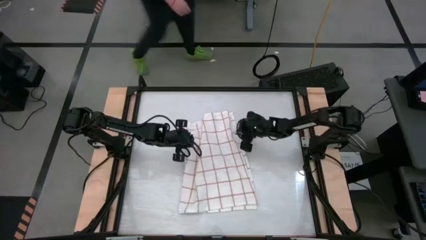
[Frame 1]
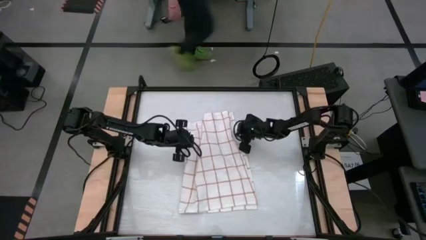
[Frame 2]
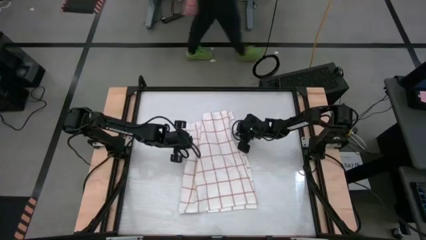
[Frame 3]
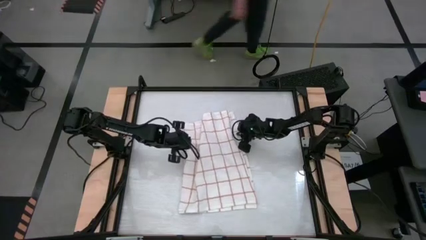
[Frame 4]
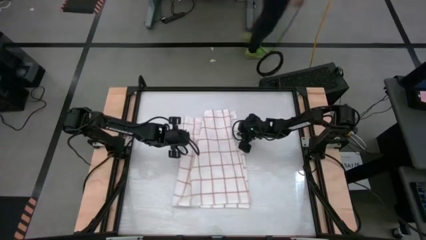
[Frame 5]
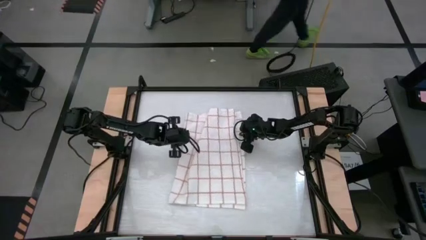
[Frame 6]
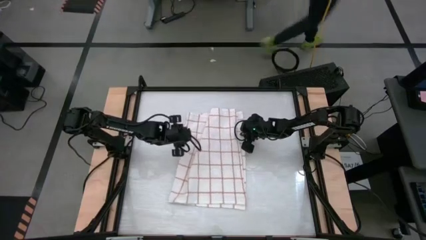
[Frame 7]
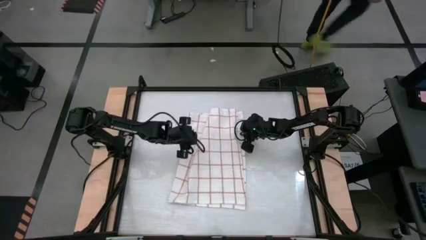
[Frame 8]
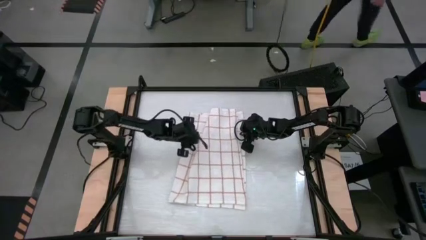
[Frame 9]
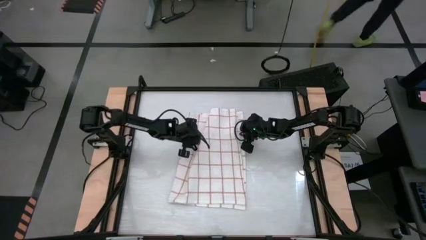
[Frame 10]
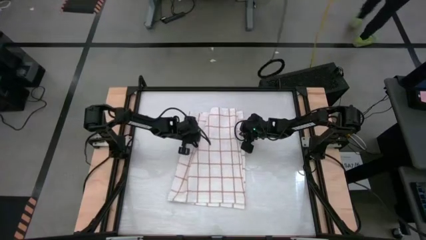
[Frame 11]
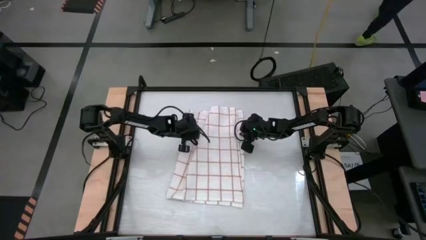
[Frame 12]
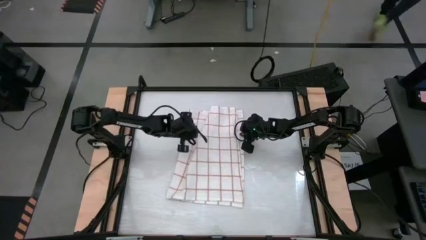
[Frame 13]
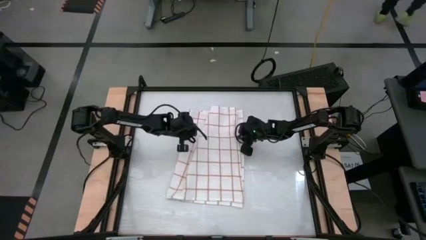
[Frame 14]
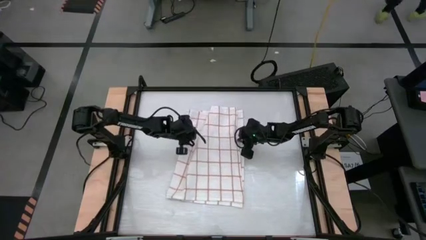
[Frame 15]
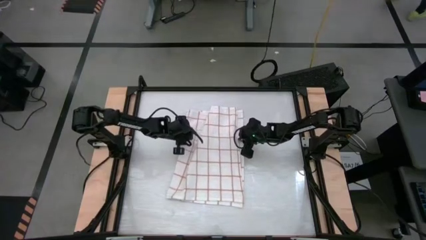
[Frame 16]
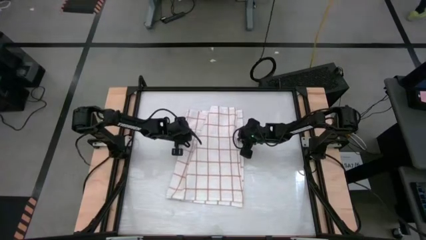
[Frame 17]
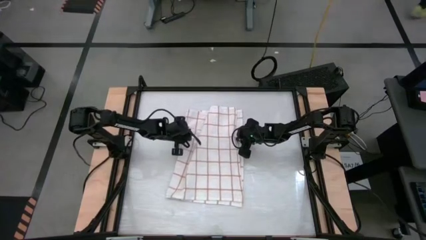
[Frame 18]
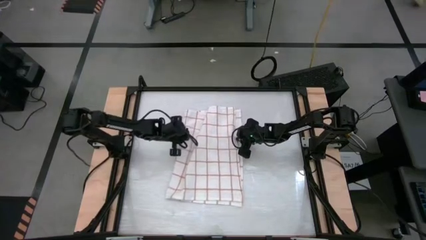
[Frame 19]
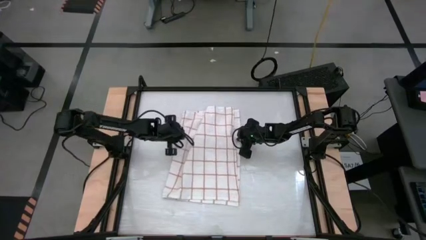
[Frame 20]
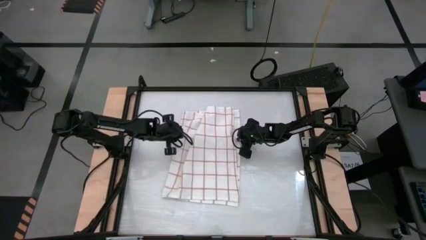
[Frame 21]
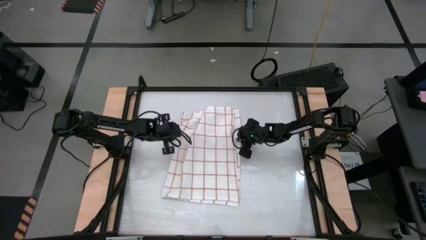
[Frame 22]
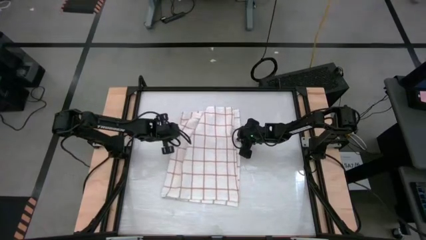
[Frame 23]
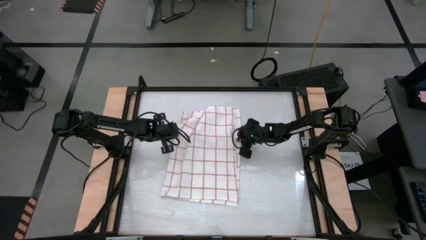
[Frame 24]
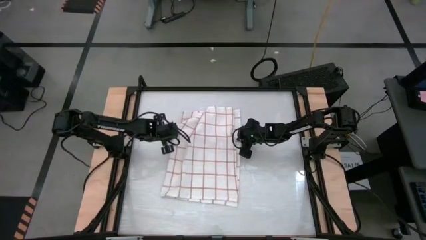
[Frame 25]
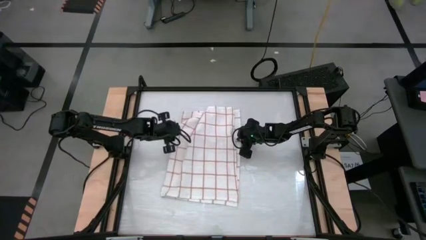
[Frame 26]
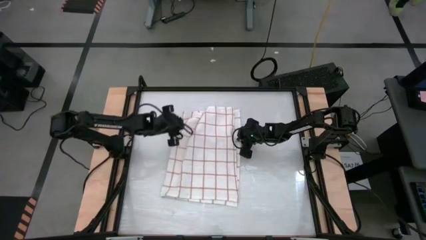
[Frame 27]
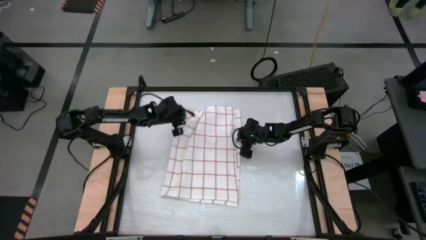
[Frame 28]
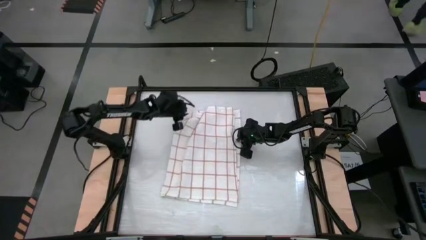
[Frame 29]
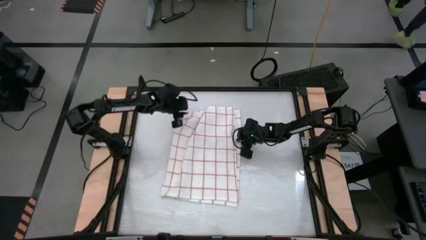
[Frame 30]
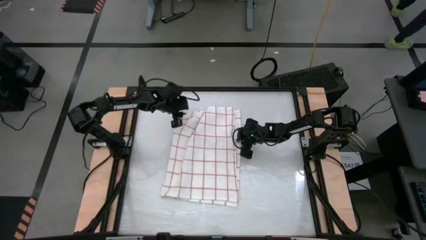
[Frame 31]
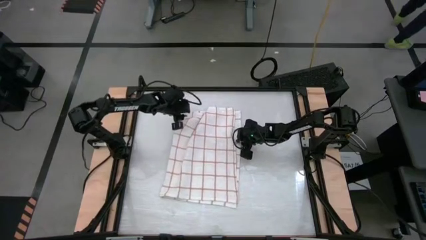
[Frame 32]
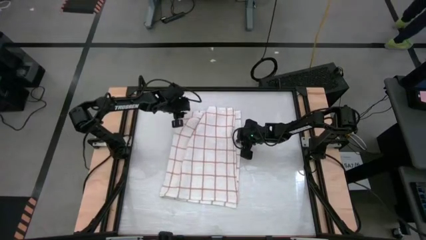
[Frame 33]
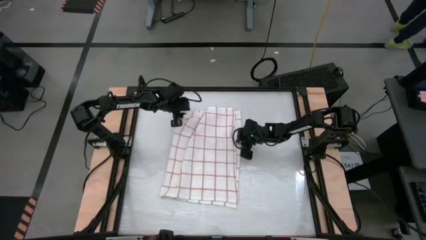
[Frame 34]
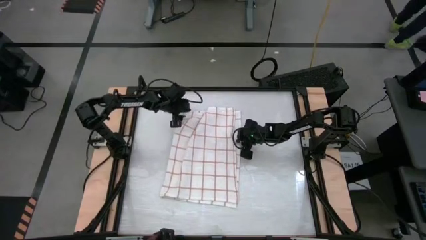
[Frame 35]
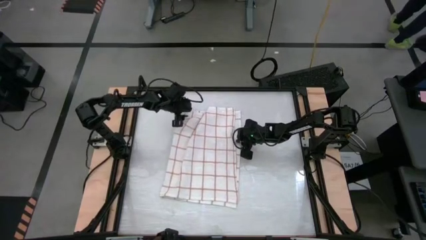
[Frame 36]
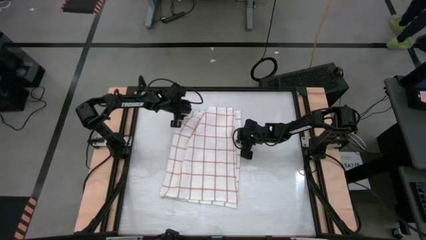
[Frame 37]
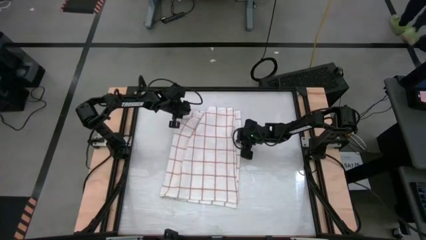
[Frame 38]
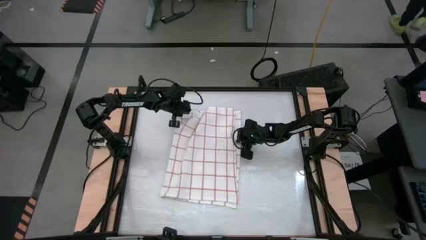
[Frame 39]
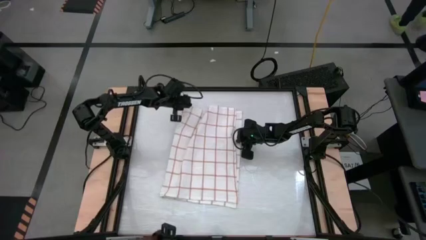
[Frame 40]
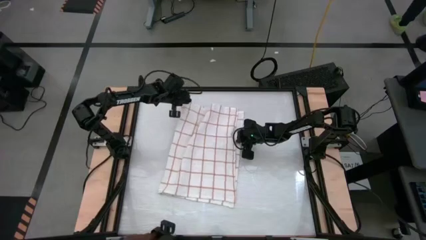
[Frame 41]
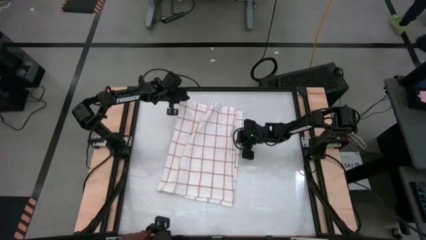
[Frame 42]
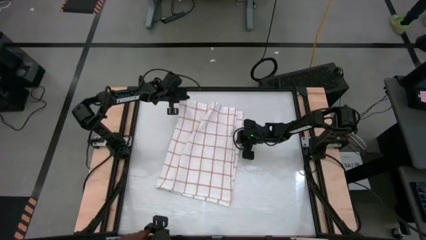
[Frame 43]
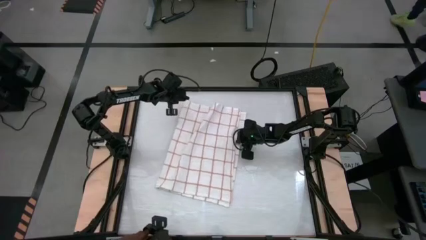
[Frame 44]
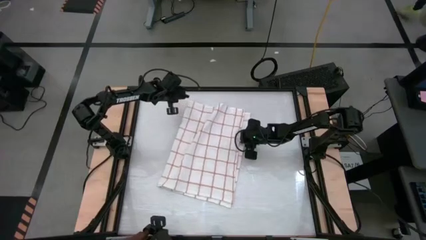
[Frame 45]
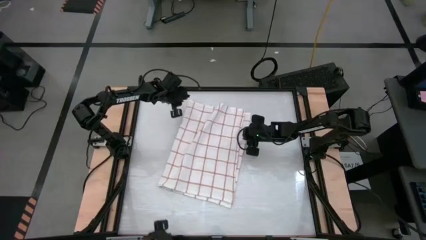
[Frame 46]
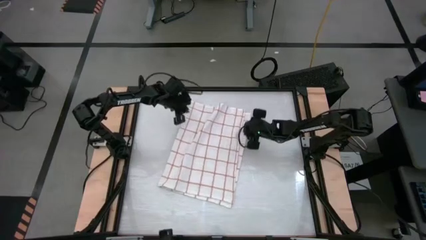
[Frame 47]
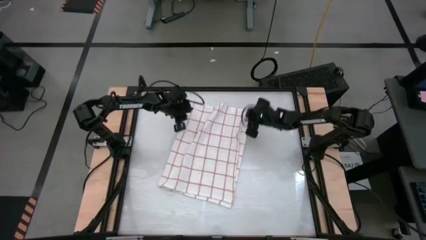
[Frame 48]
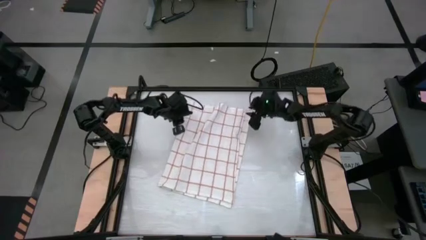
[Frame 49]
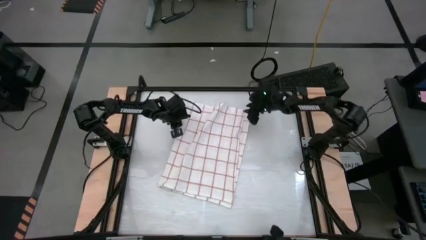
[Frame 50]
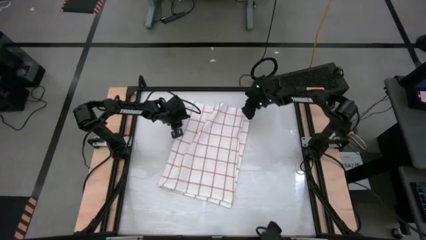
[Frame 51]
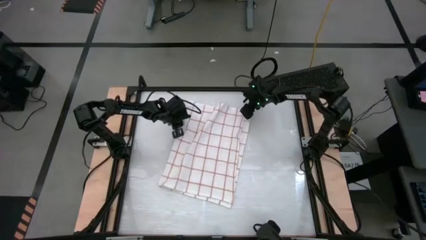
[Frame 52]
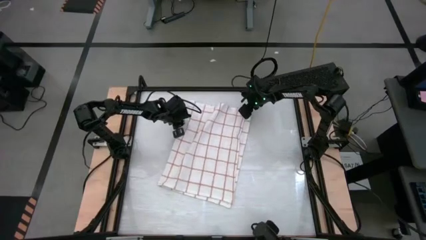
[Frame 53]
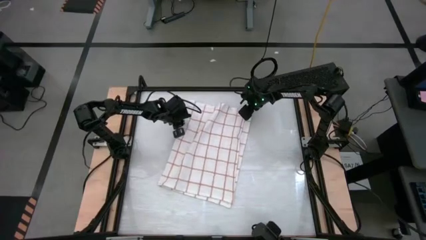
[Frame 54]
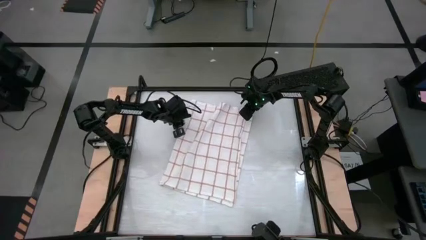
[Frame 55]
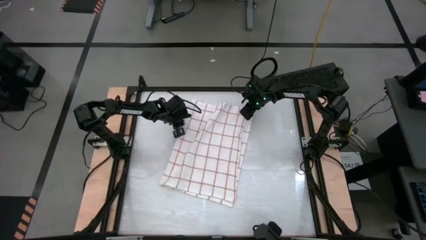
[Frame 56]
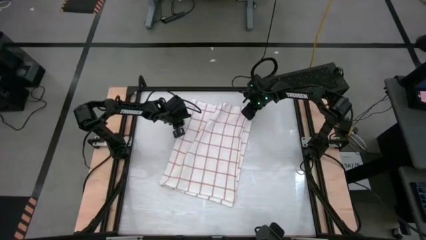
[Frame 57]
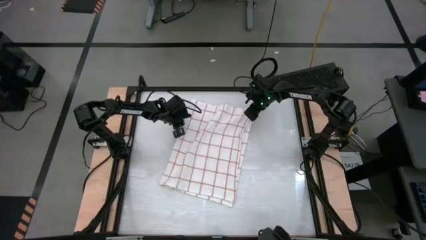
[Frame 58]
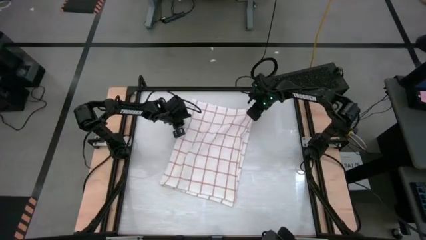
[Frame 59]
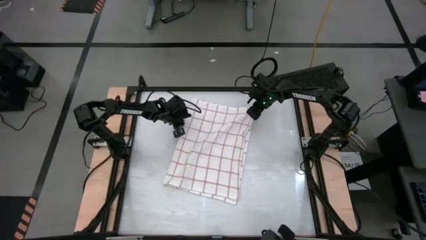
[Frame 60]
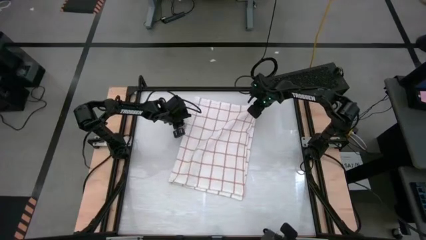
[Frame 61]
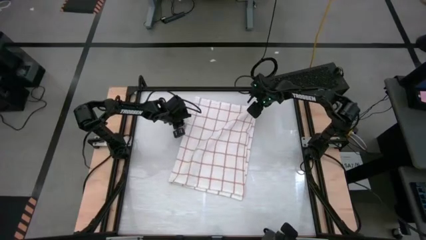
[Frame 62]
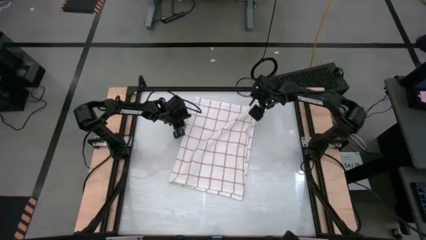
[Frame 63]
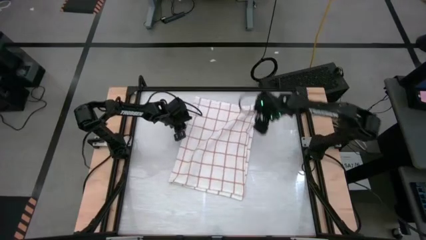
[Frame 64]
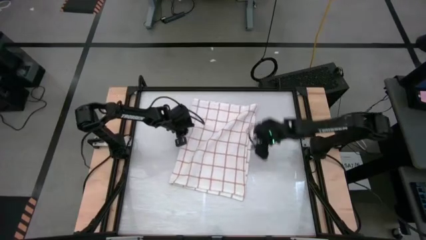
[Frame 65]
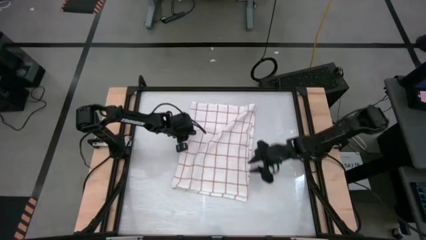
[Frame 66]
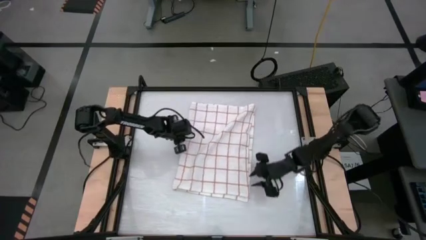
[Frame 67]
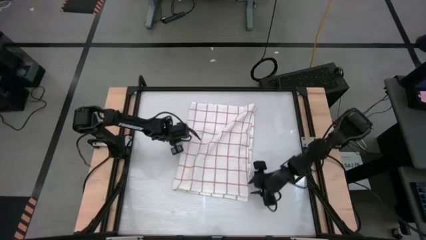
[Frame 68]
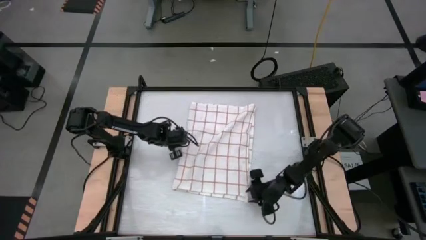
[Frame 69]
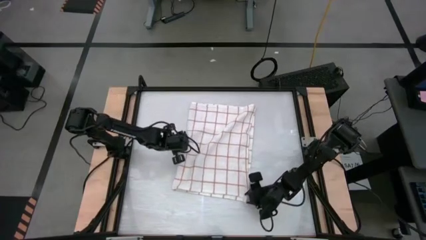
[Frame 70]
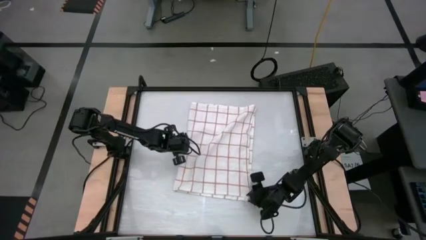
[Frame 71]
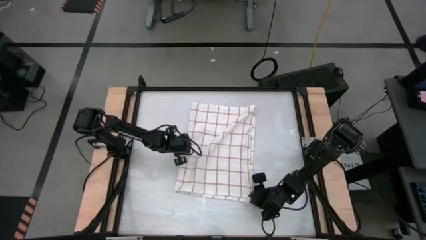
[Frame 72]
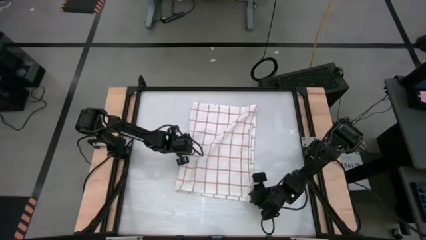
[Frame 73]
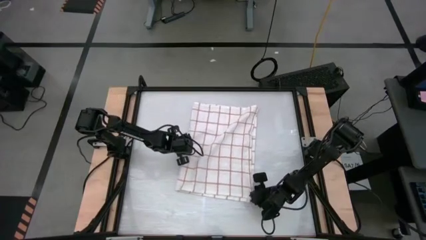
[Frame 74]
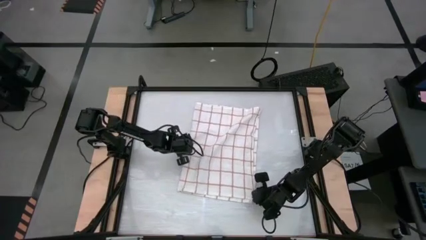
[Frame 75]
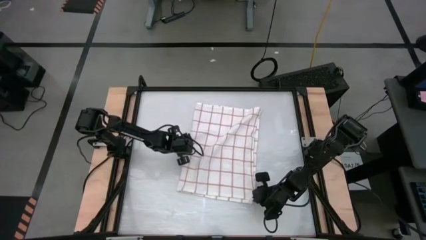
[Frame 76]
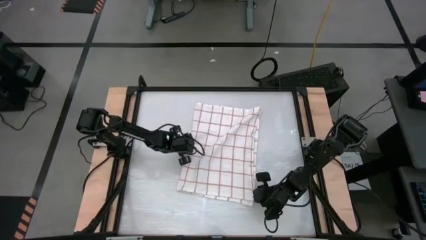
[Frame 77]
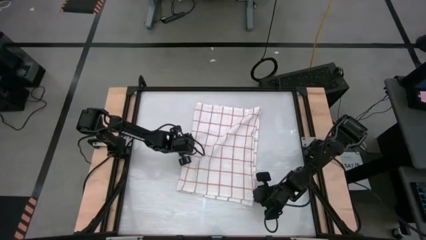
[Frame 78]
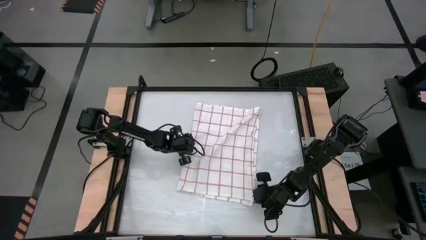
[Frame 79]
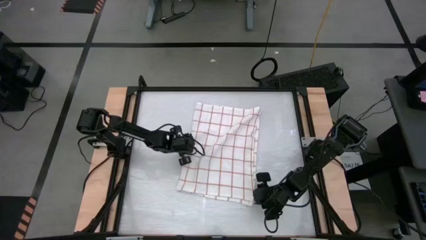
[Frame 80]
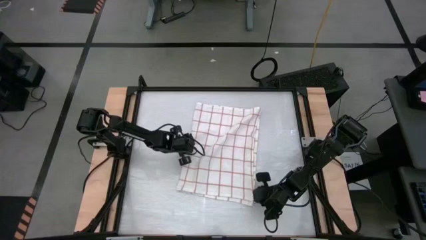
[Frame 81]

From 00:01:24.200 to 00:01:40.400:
Task: Roll towel
Fold the white checkered towel
